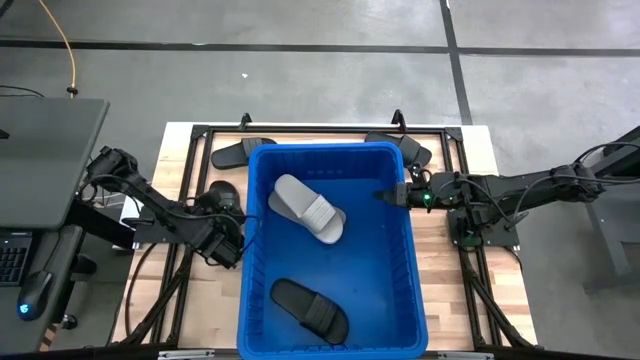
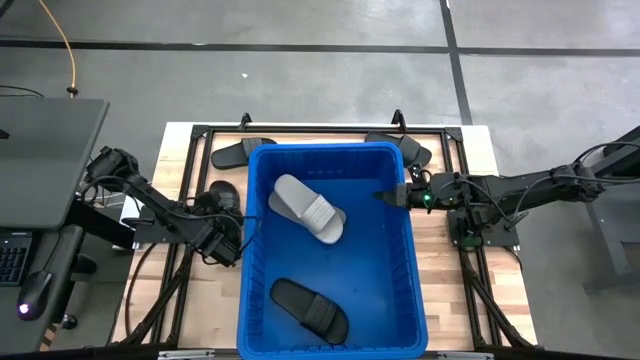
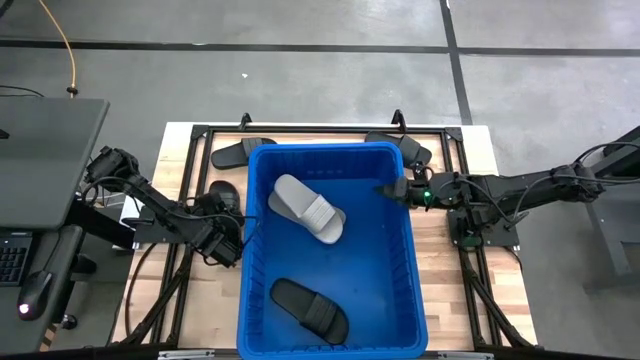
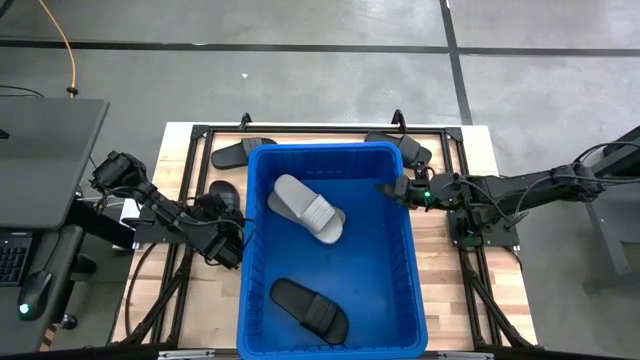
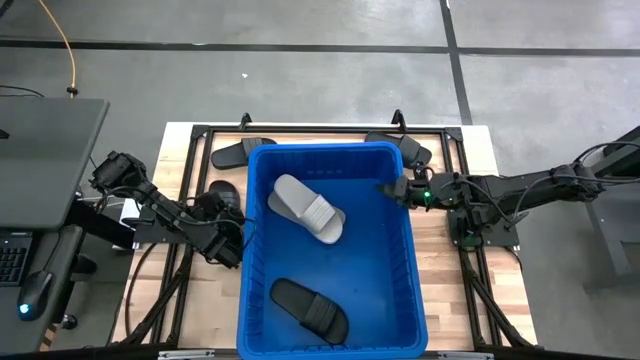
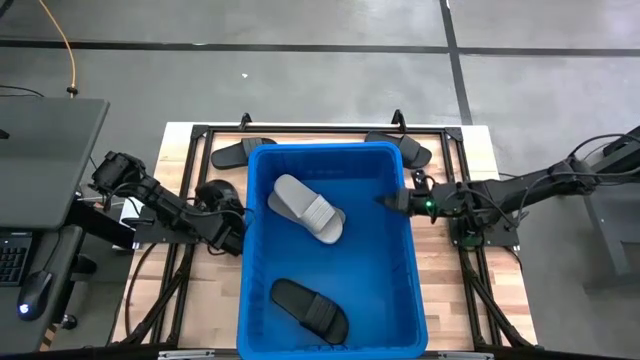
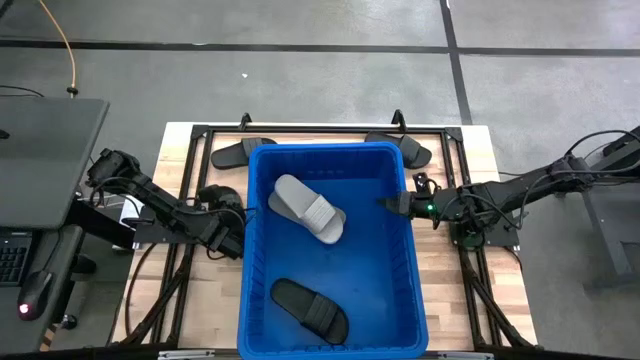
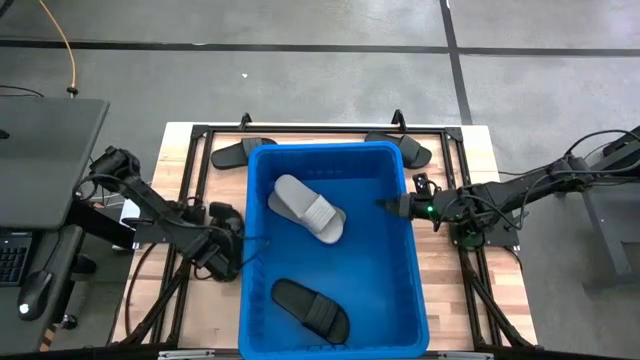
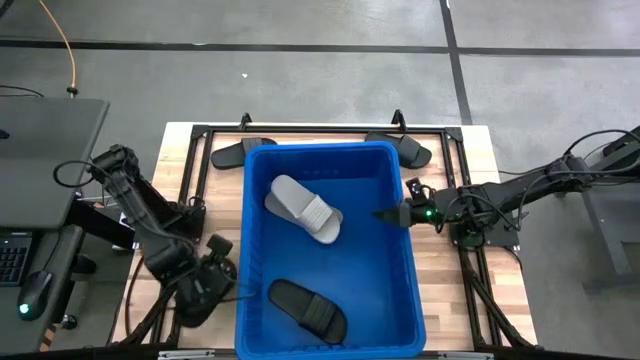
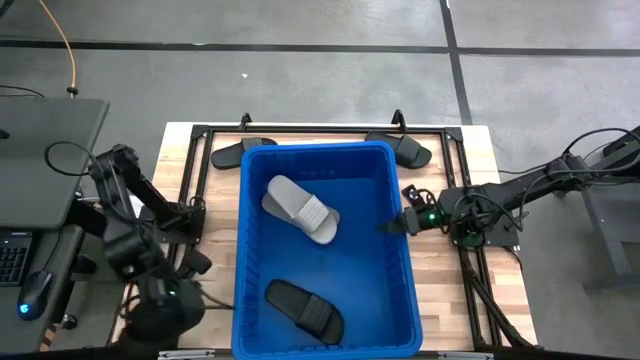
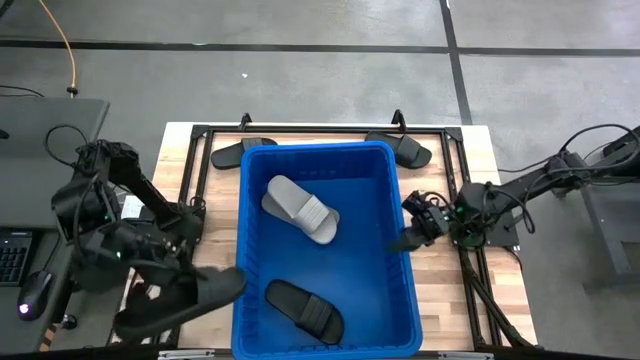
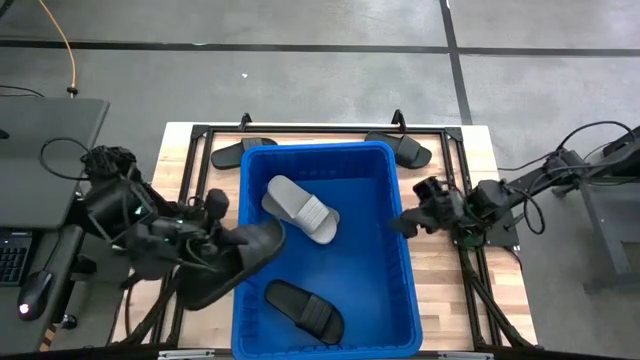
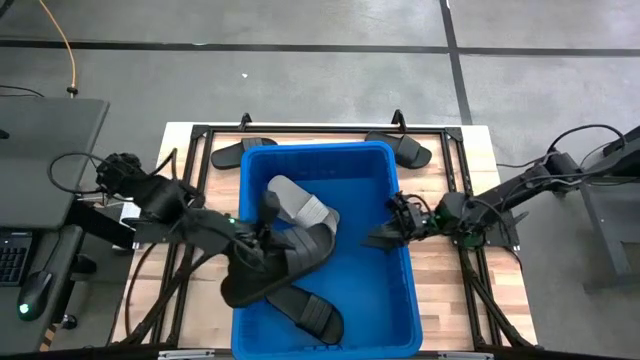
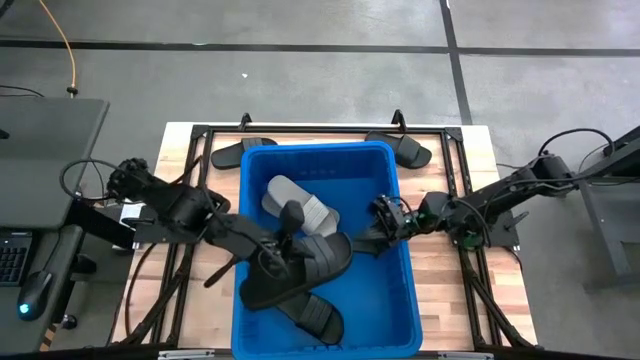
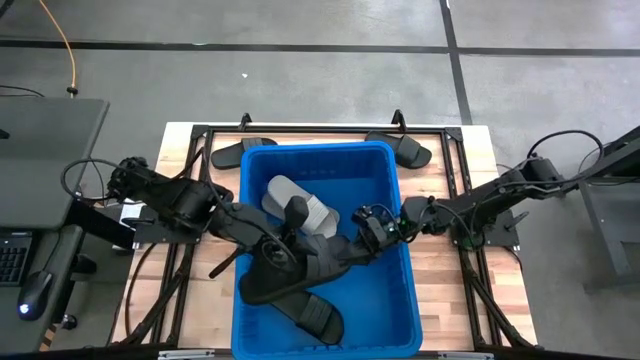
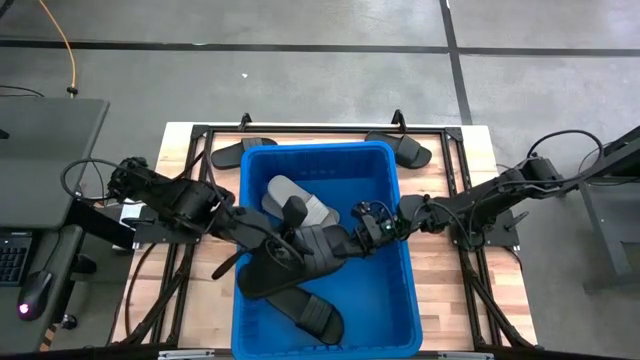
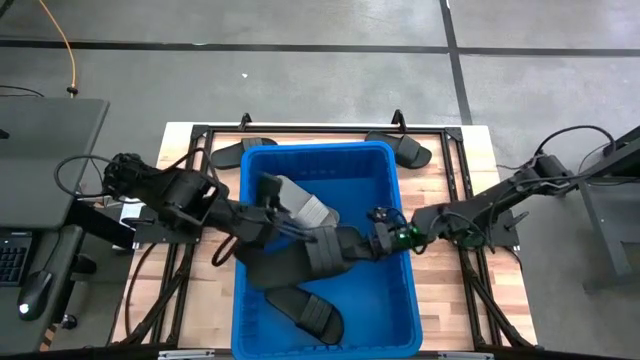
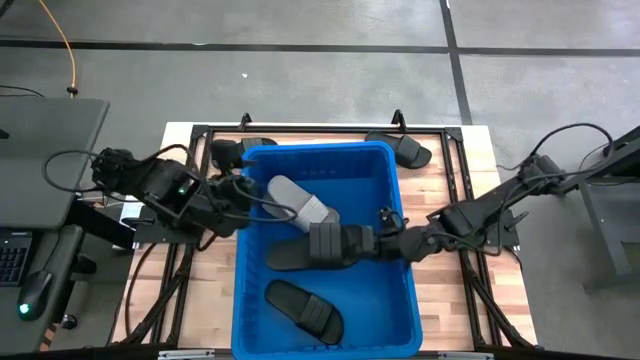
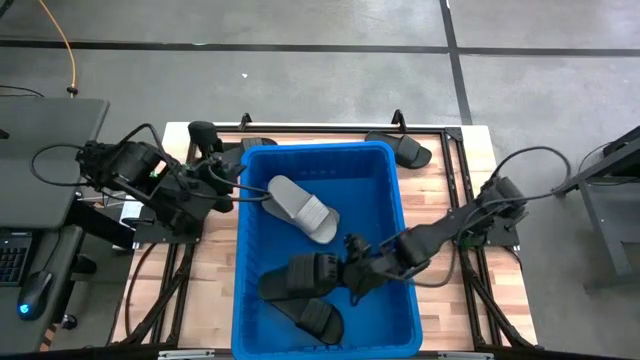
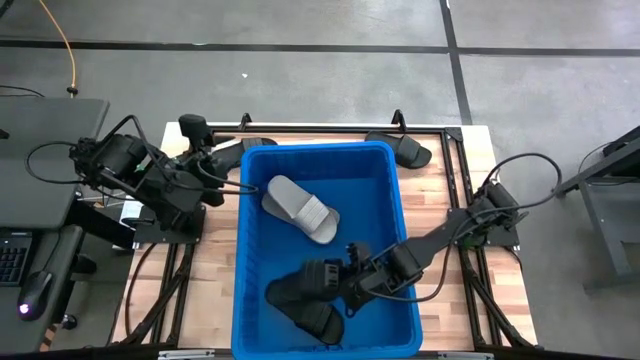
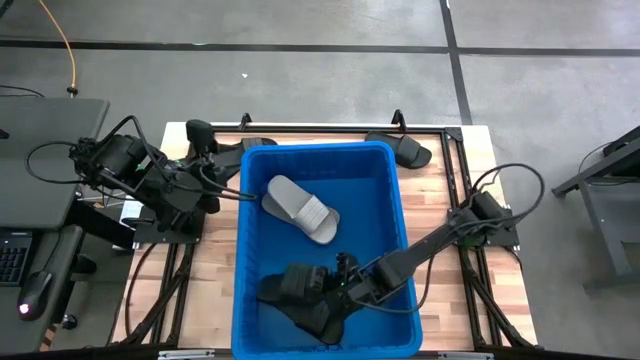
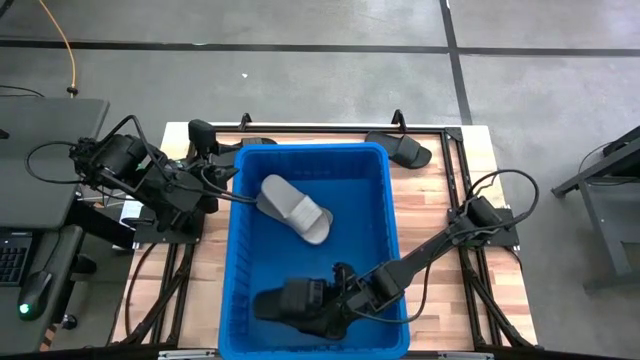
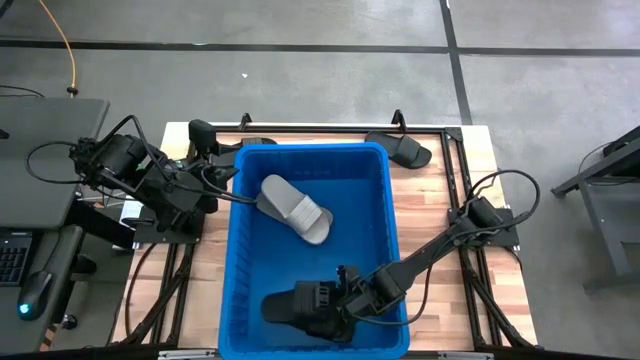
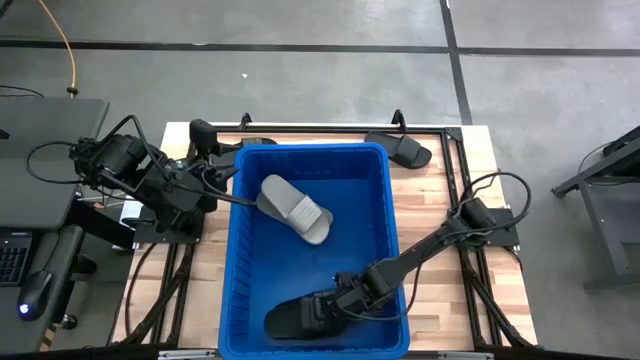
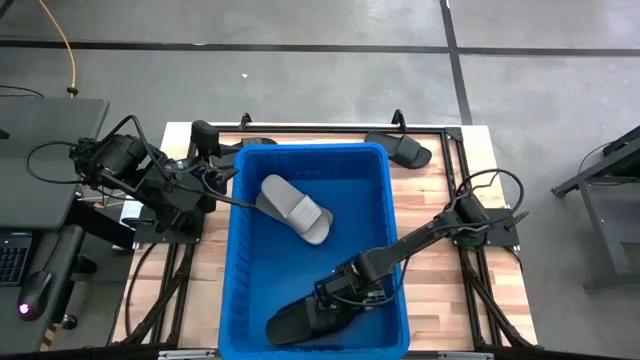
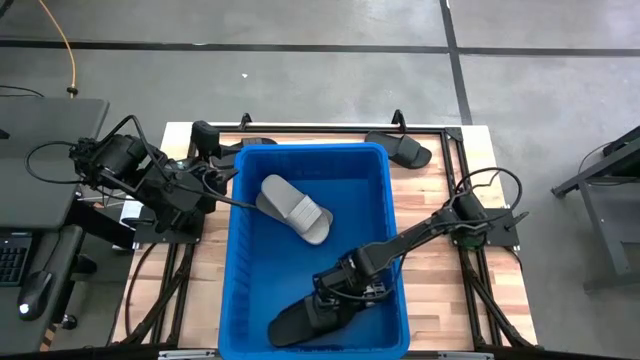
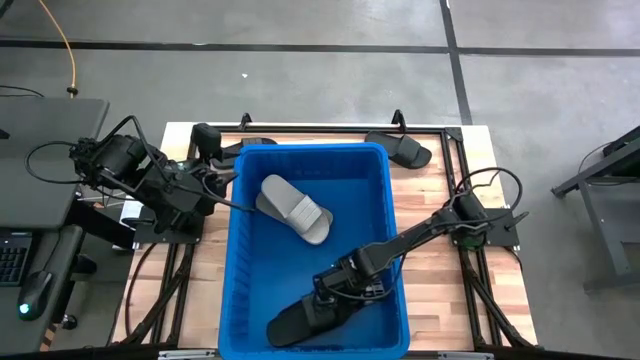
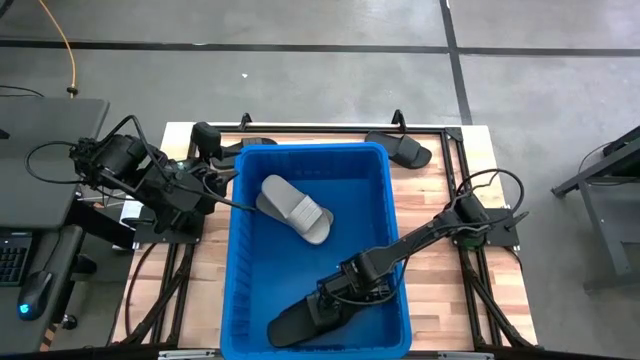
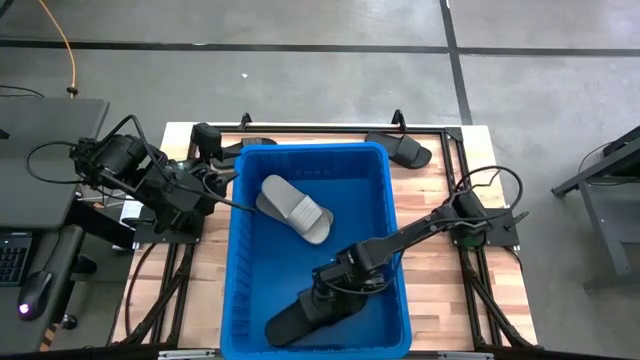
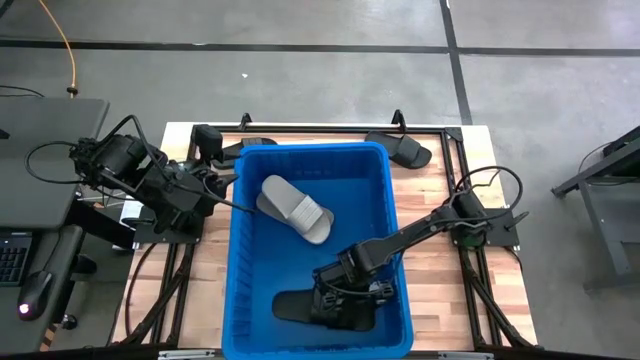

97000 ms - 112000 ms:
Task: Pick and place slides into bin
Put the bottom black slipper into the blue bin

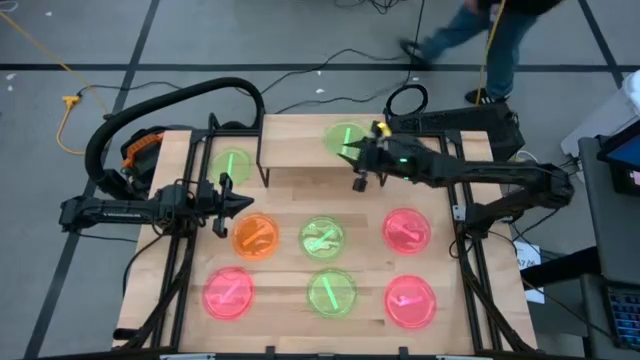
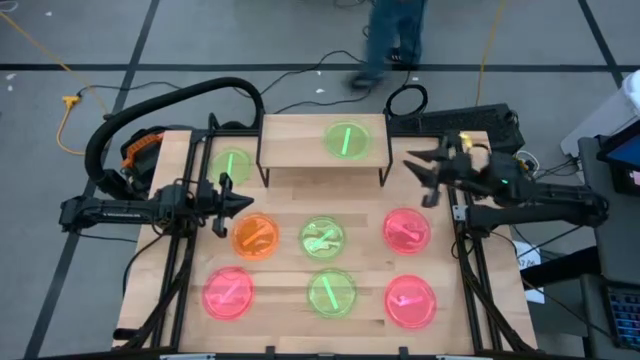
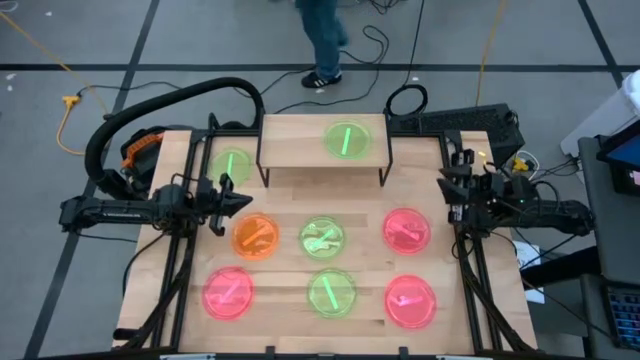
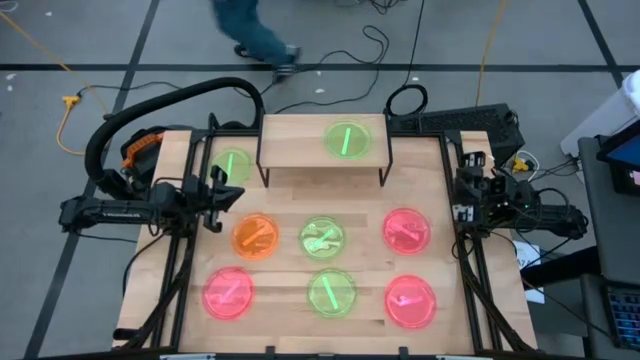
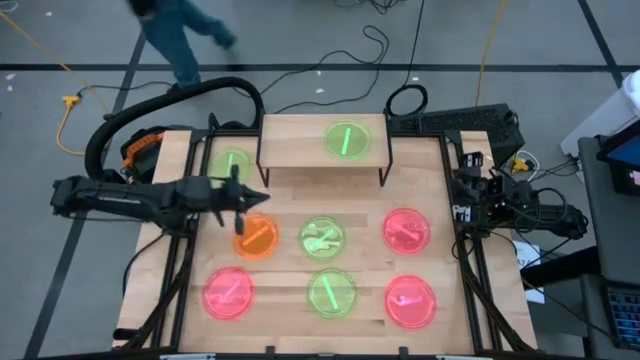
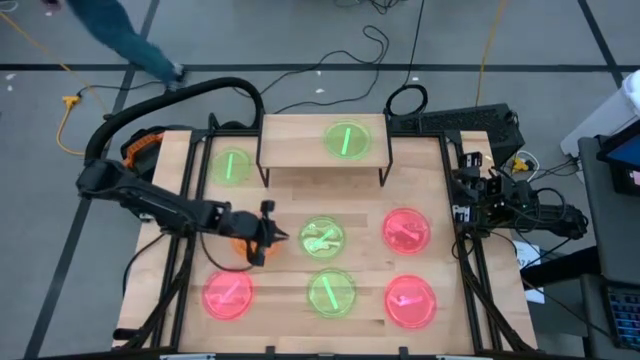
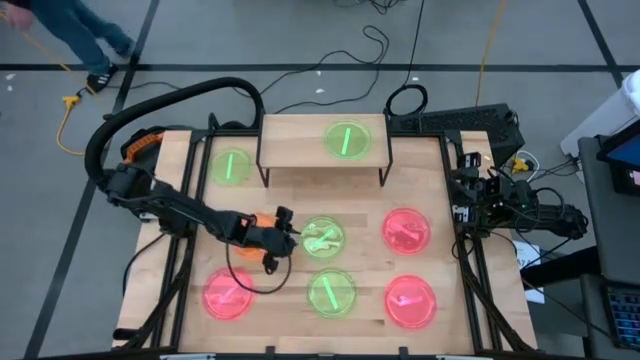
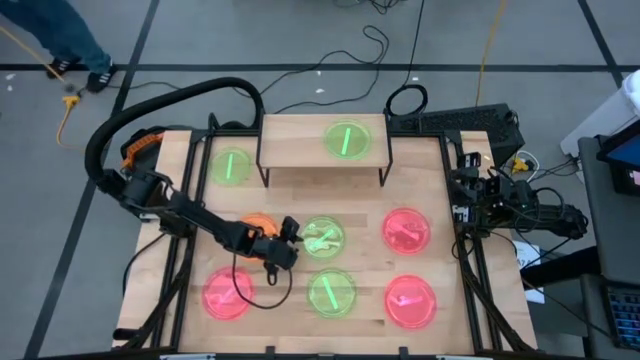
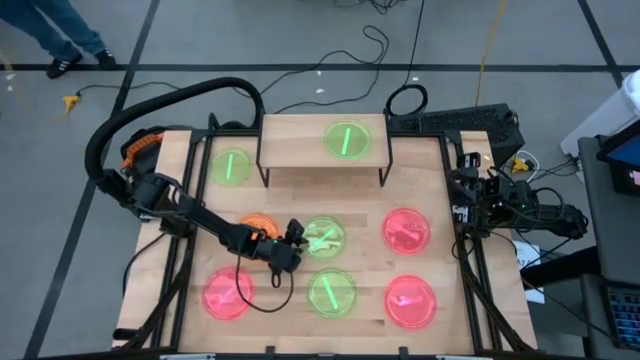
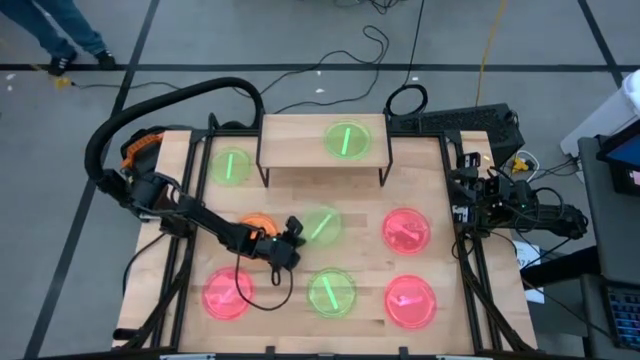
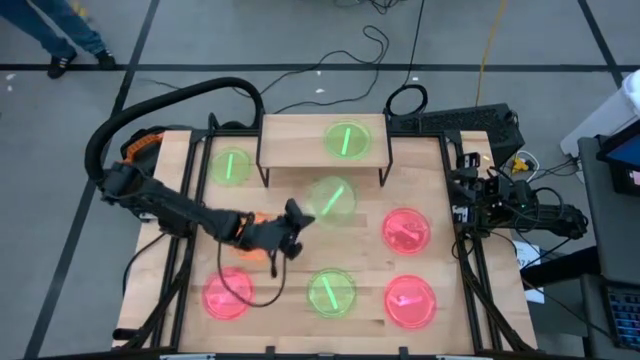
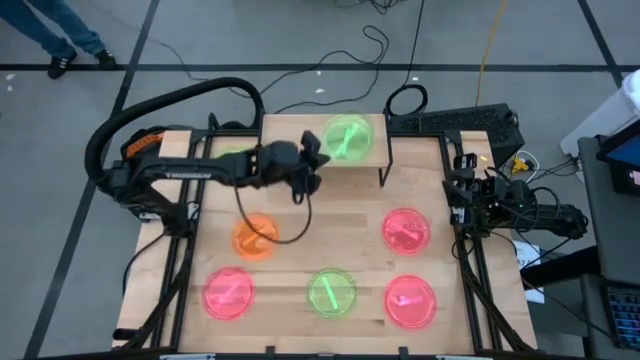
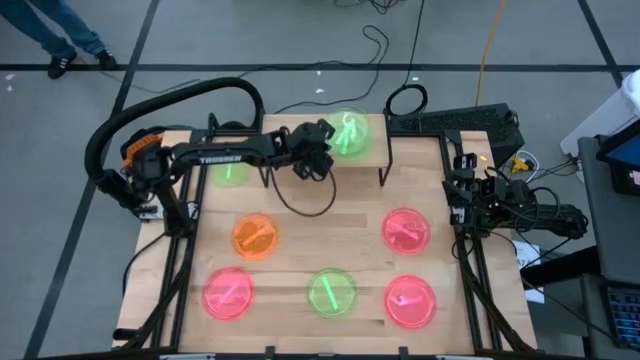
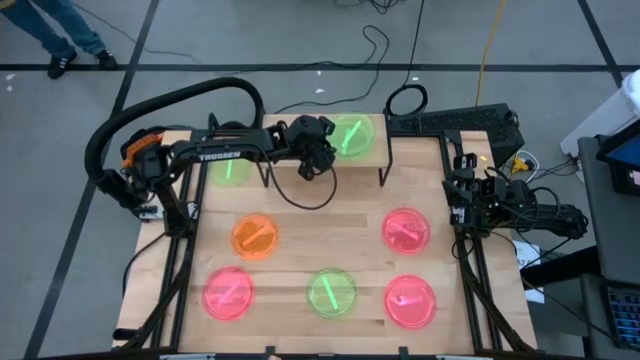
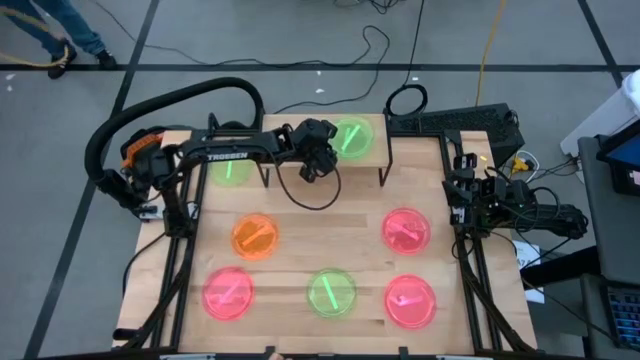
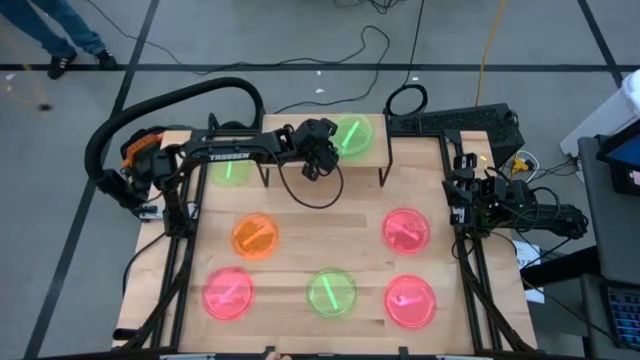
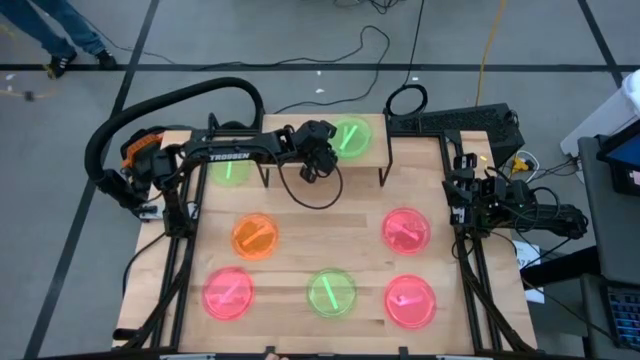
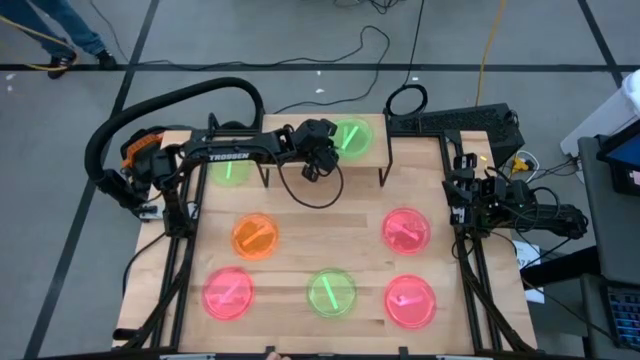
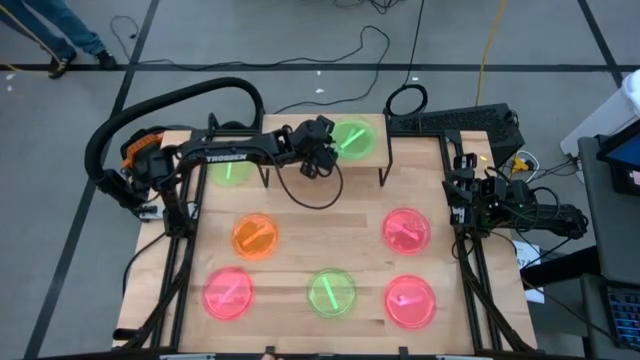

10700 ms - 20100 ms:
Task: Place and stack plates onto a shelf
Stack the green plate on top of the green plate on the shelf
